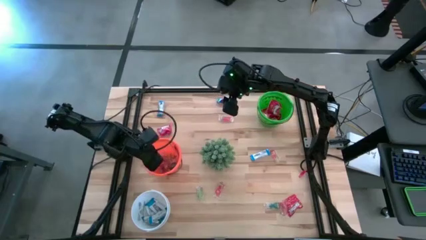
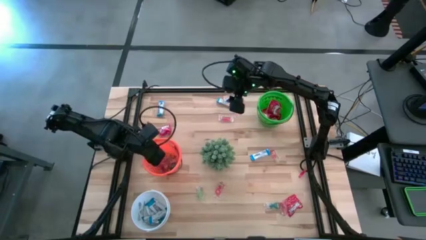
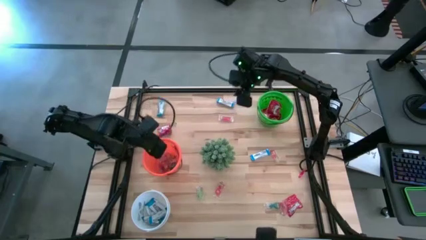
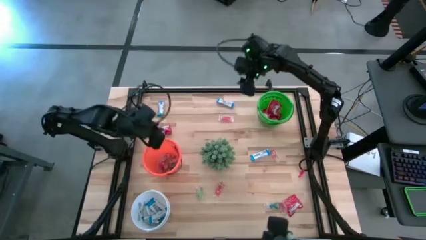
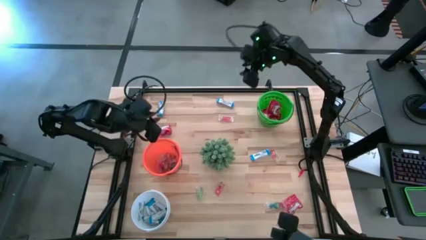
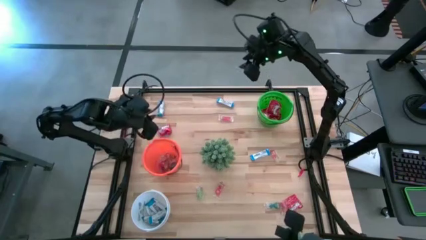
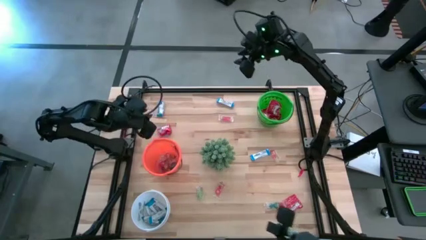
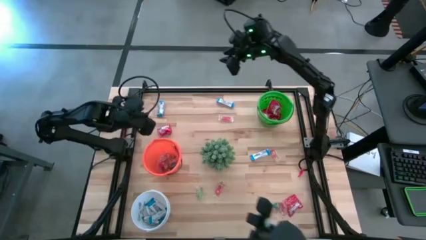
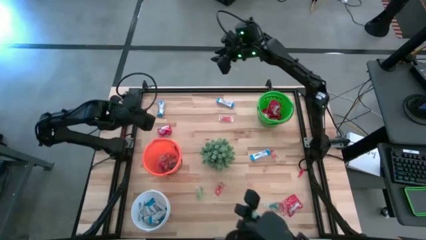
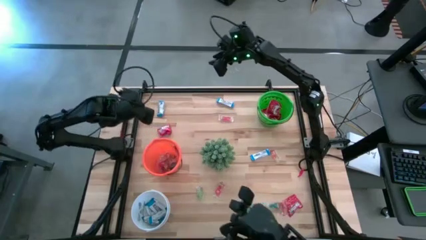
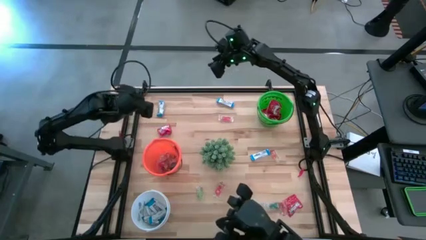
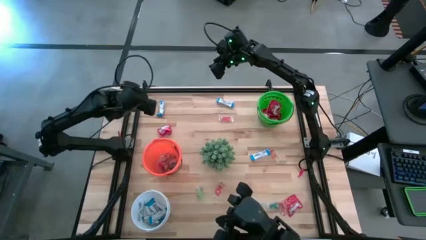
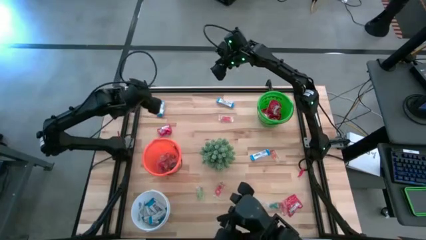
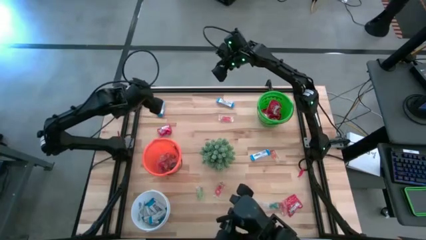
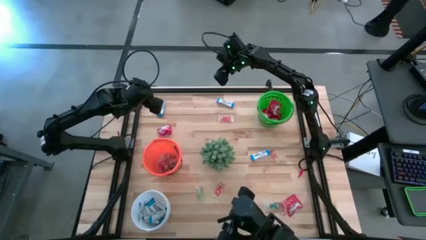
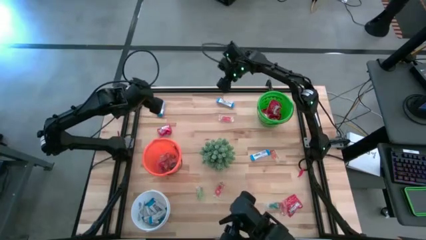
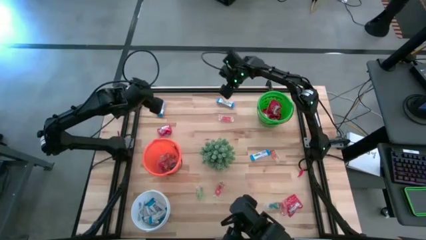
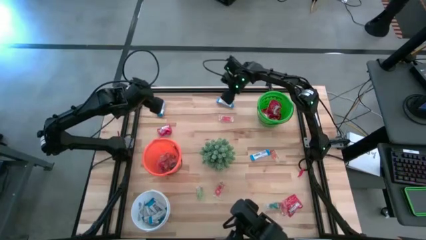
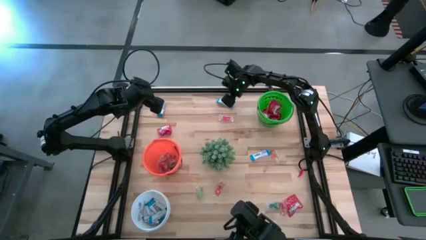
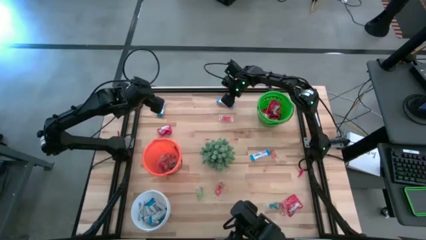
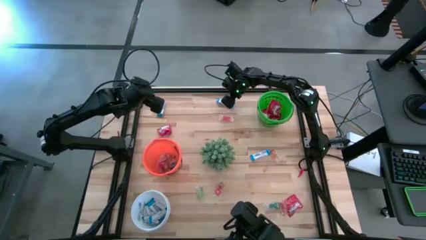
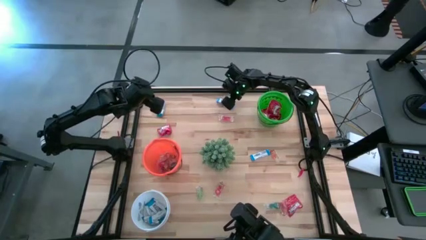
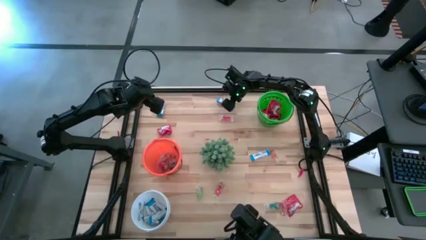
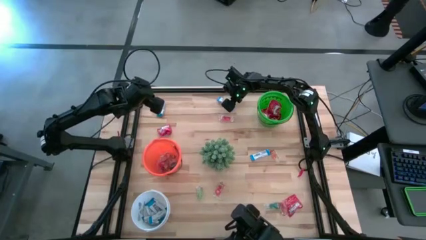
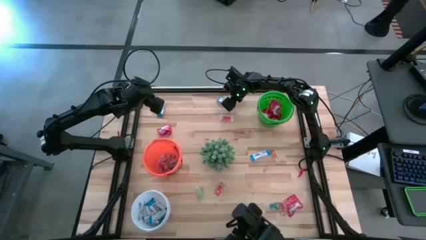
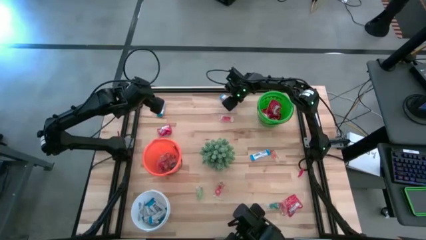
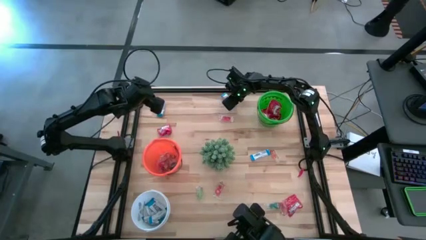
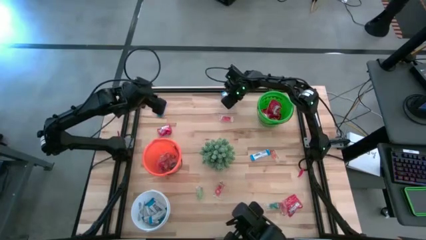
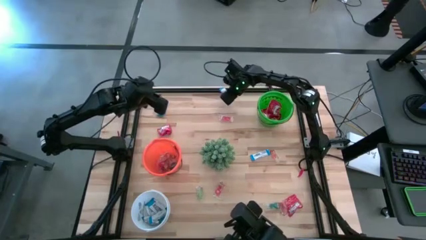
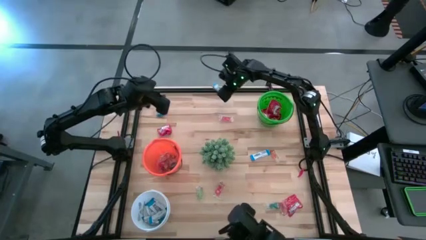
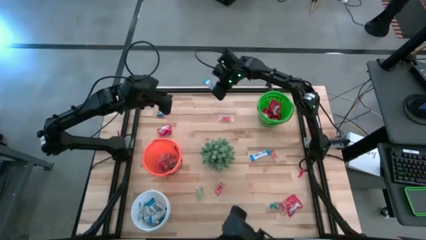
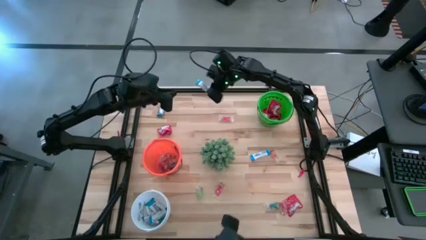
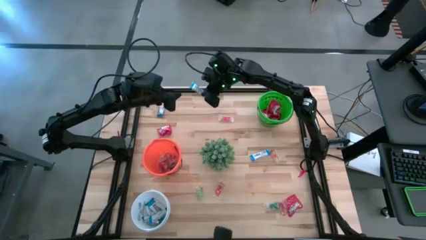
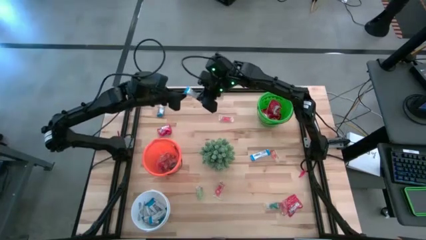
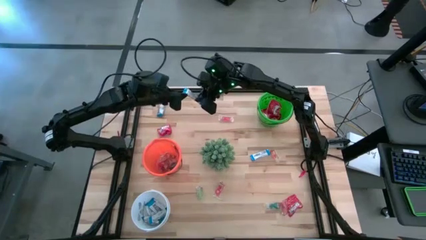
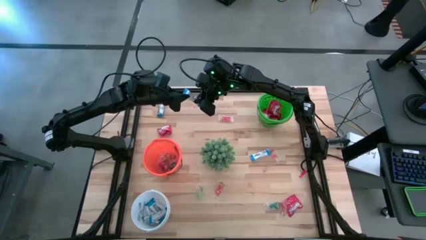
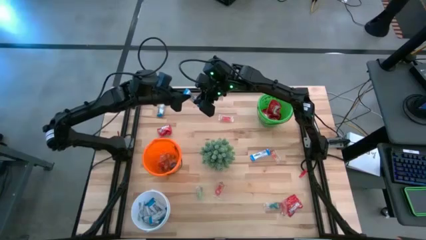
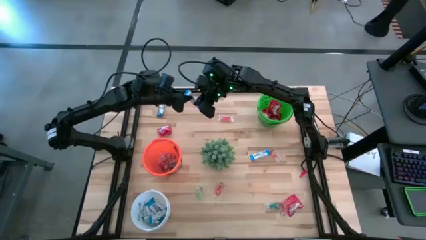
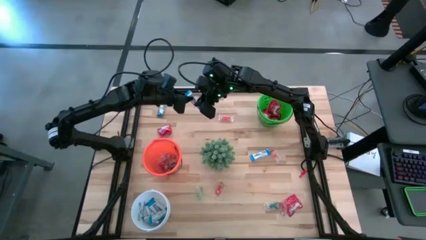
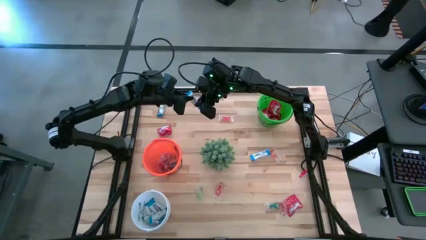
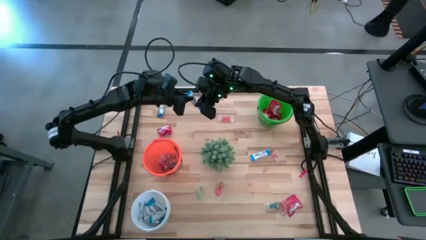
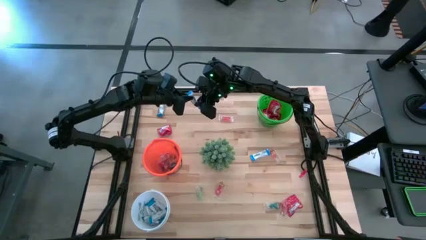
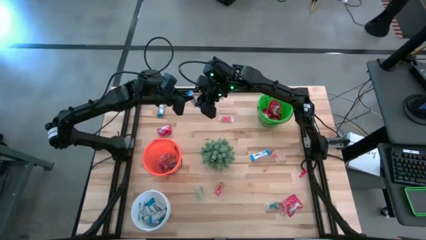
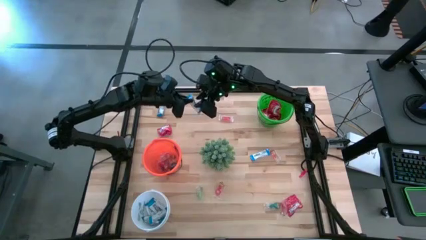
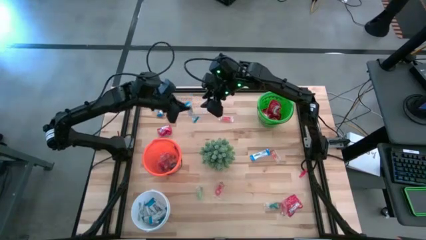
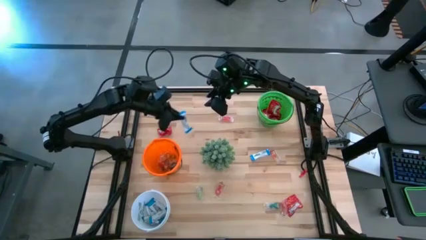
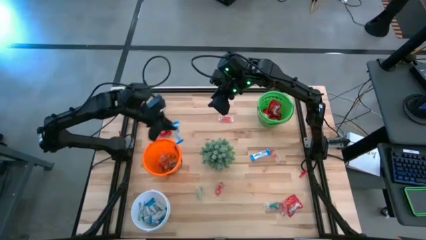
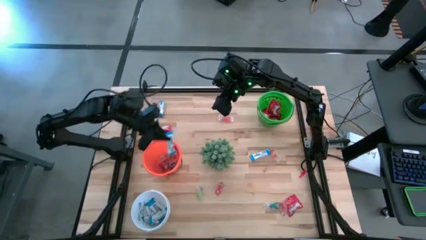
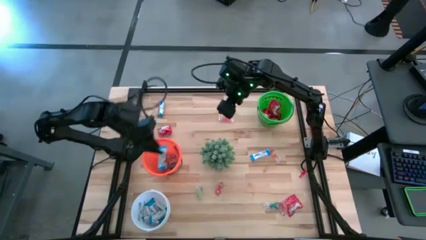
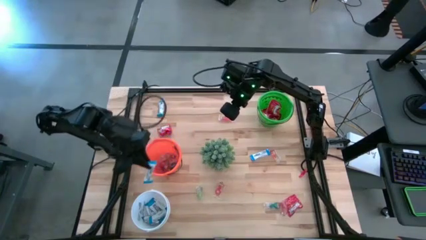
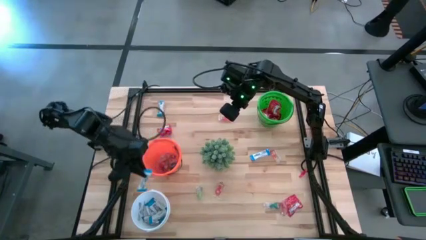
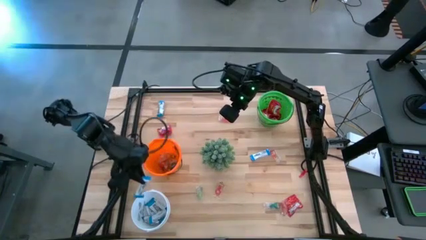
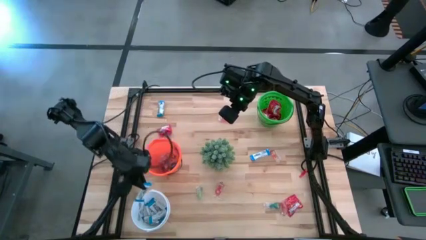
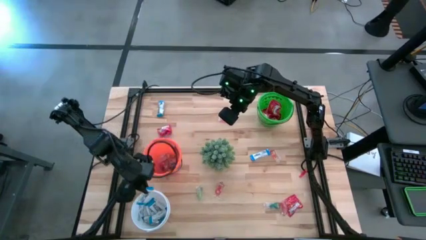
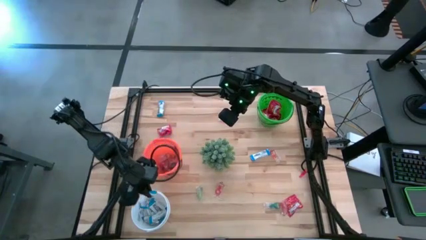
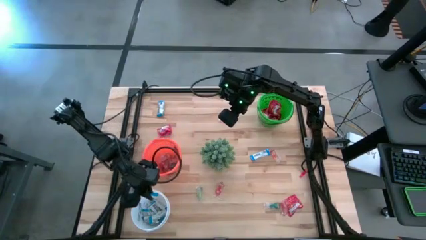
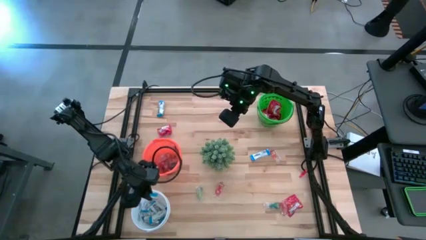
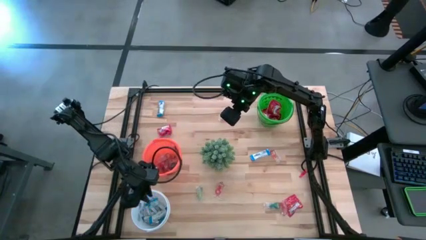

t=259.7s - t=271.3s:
Task: Sort candy
Put the white chocolate into the white bucket

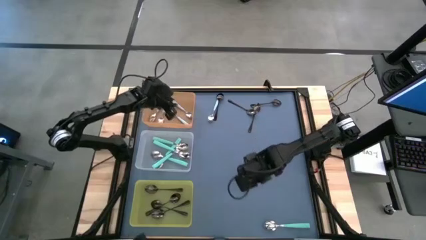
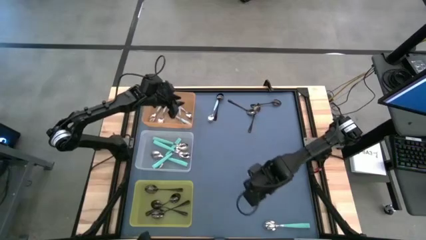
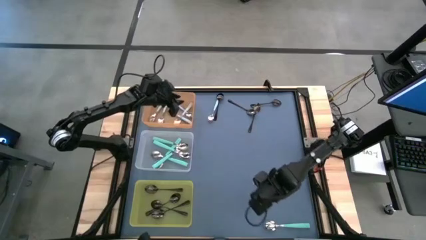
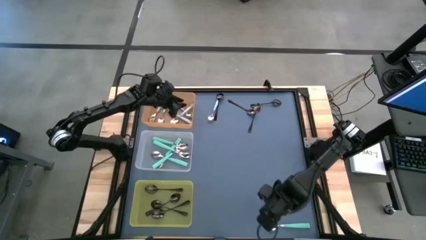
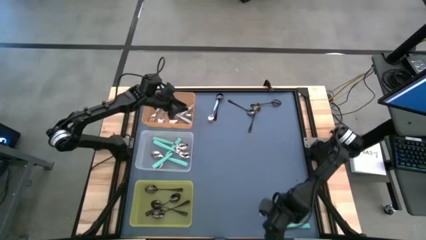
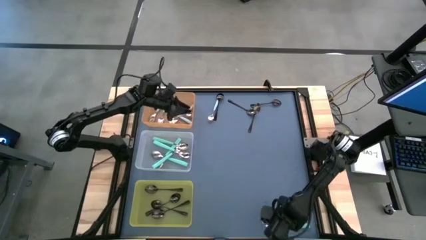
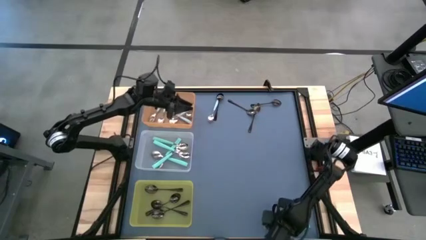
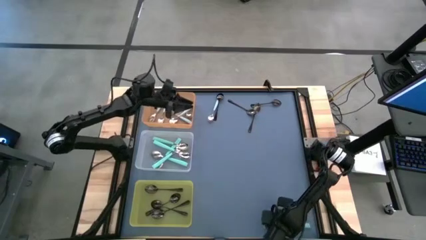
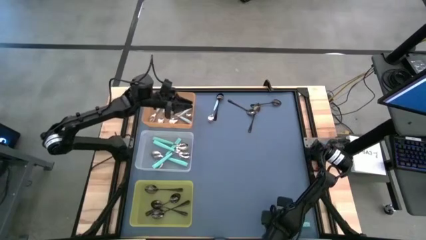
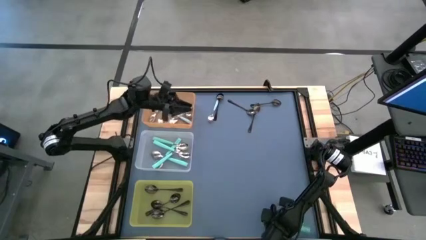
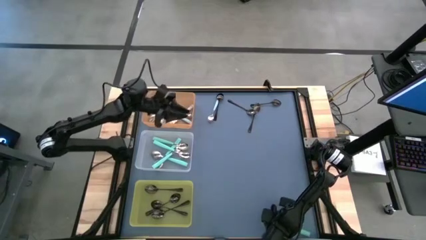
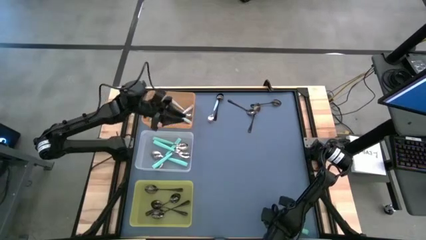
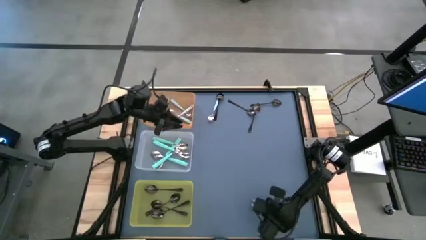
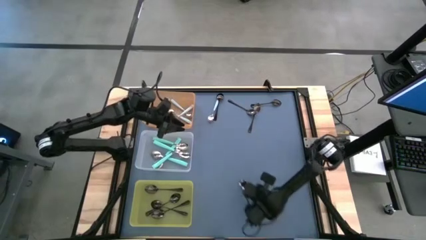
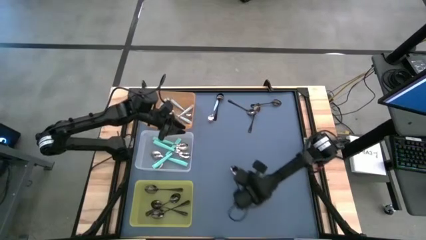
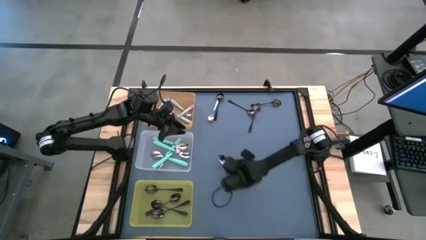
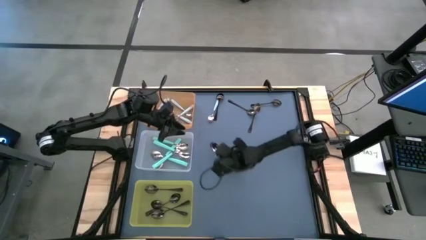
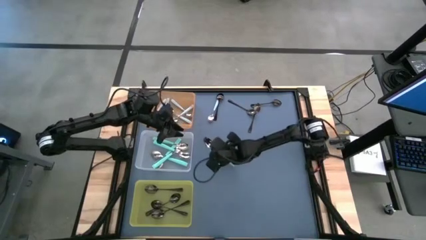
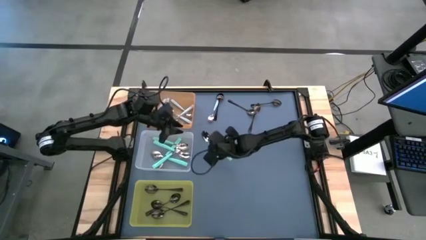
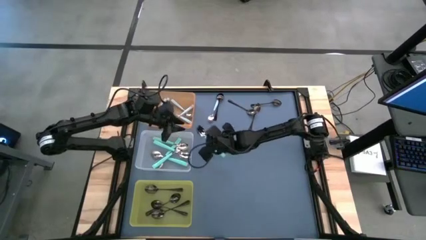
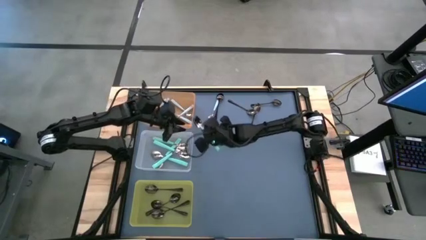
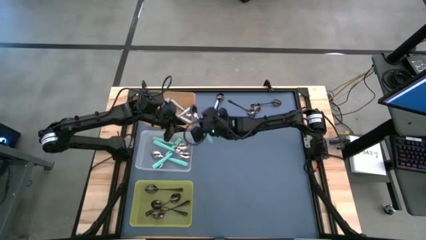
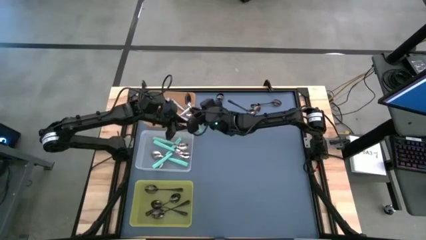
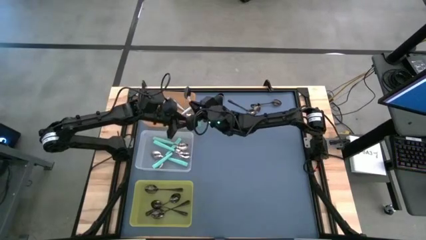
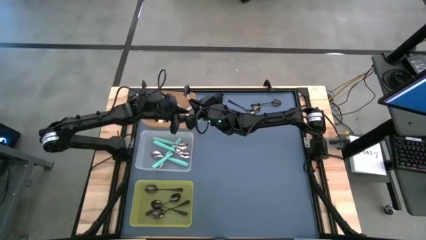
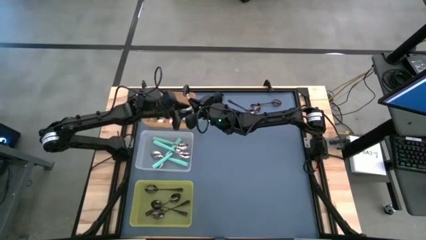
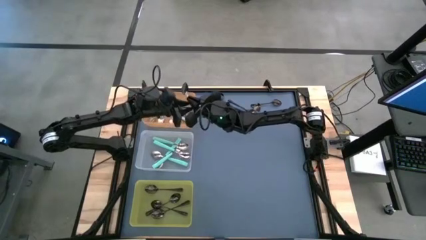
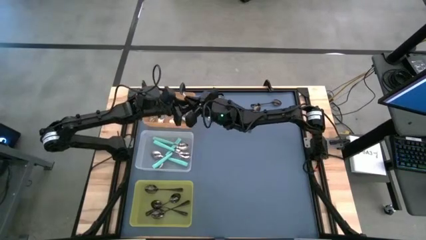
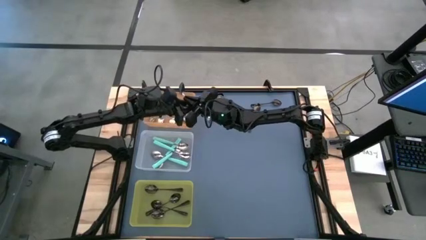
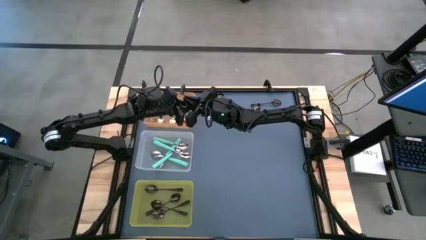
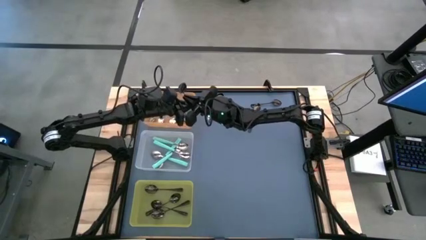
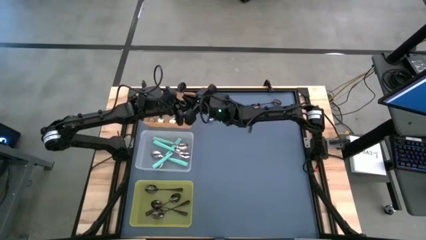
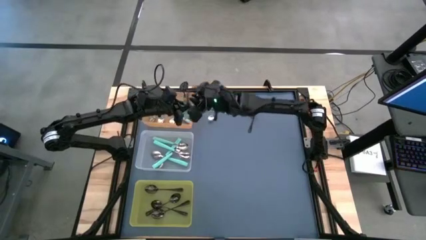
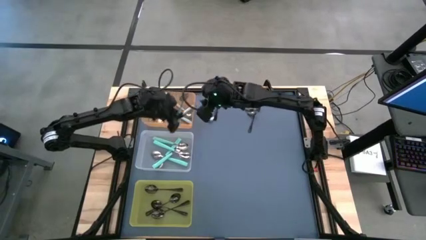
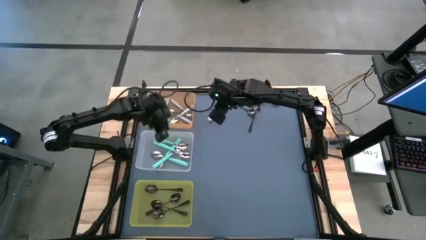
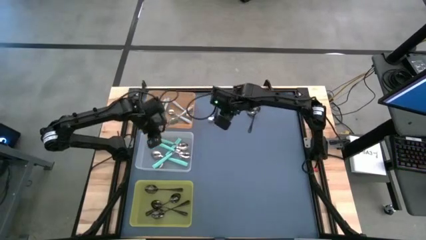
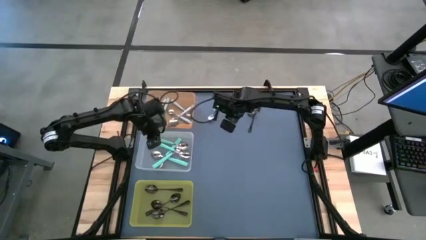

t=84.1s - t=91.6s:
Task: Sort silverware by color (type)
Put the light green spoon into the transparent bin
